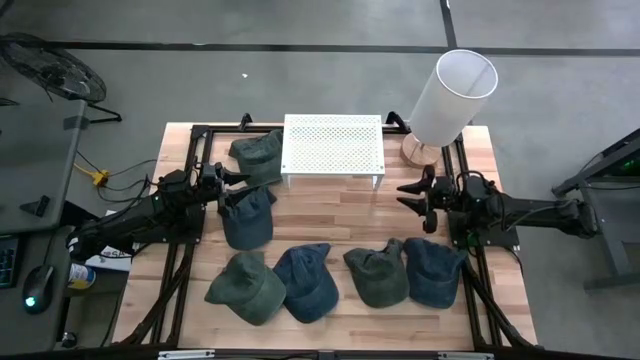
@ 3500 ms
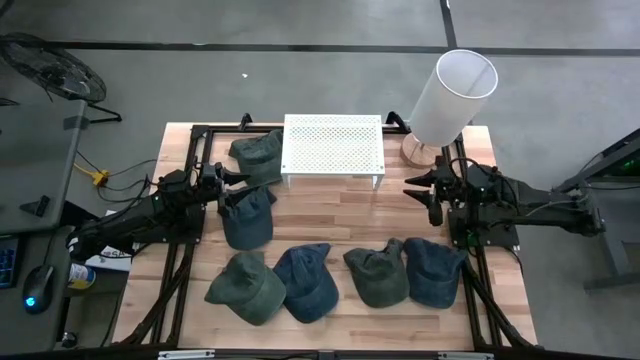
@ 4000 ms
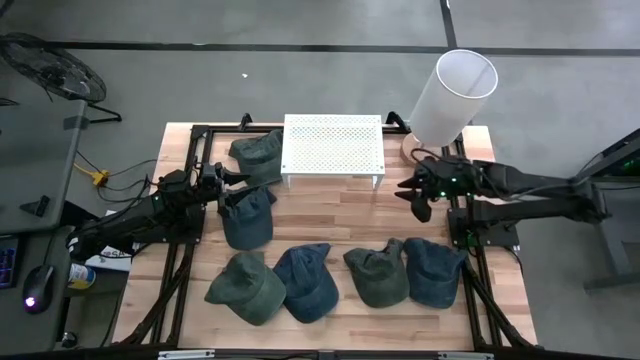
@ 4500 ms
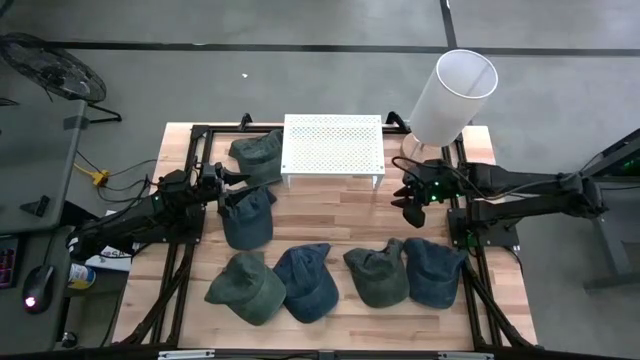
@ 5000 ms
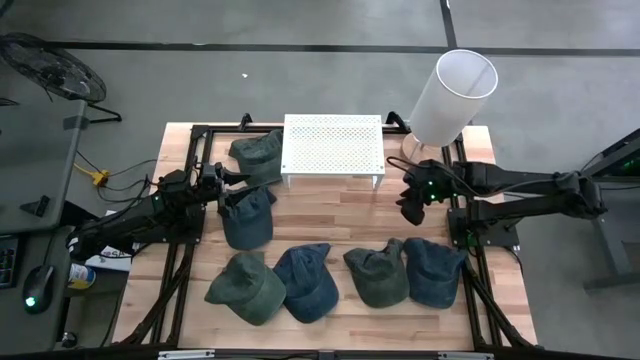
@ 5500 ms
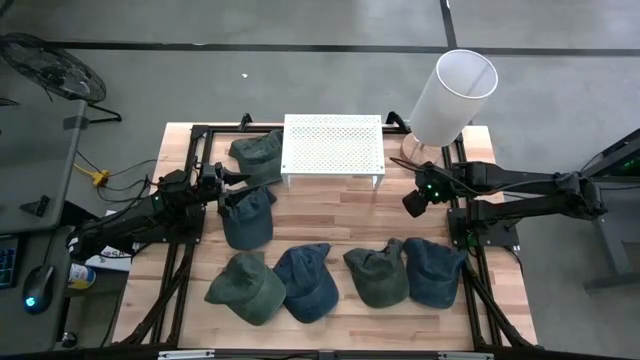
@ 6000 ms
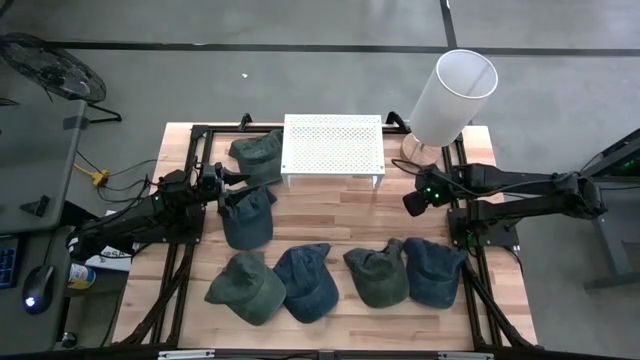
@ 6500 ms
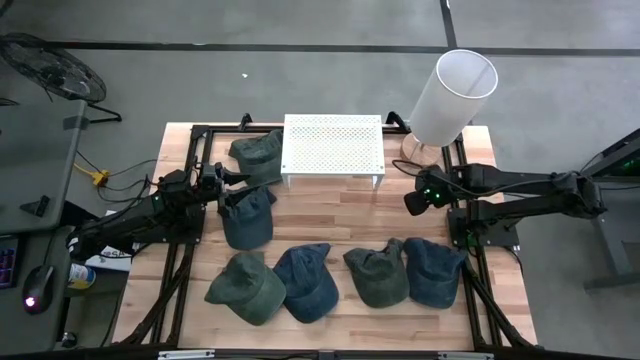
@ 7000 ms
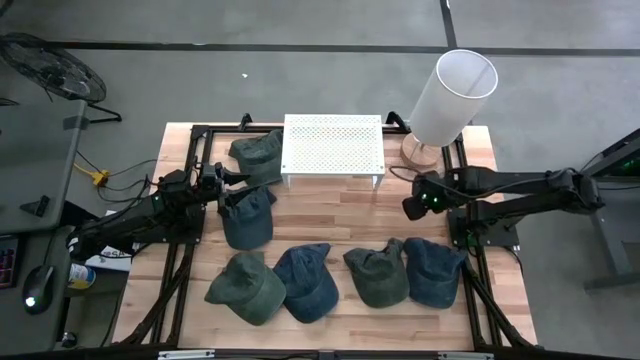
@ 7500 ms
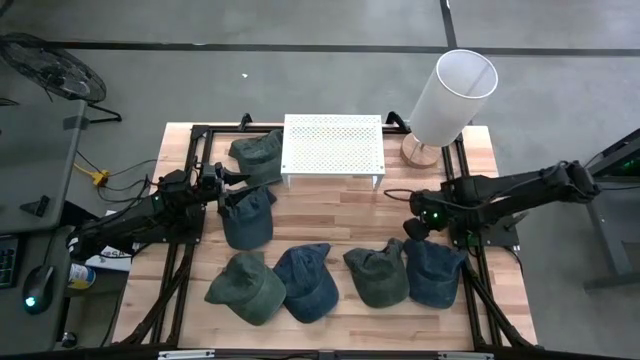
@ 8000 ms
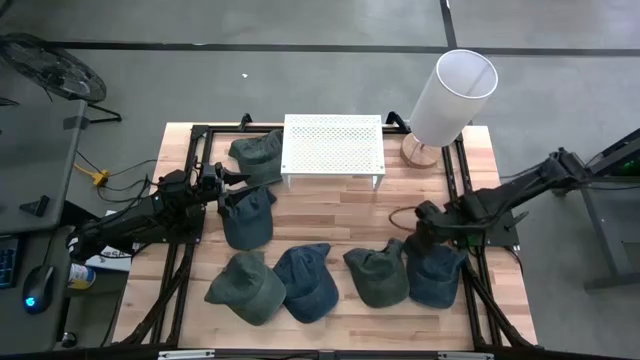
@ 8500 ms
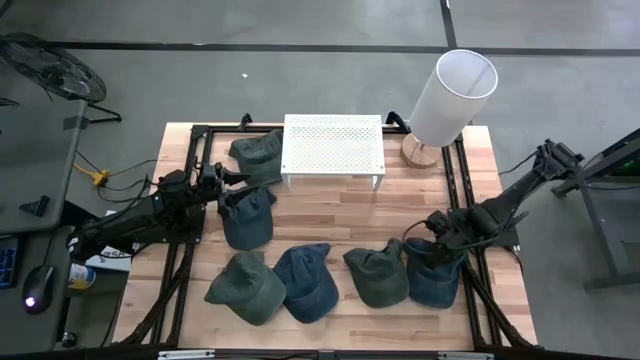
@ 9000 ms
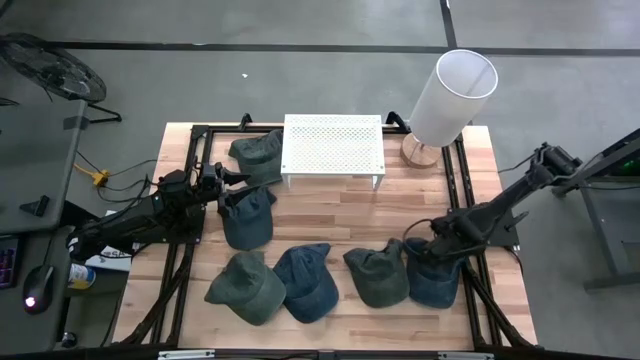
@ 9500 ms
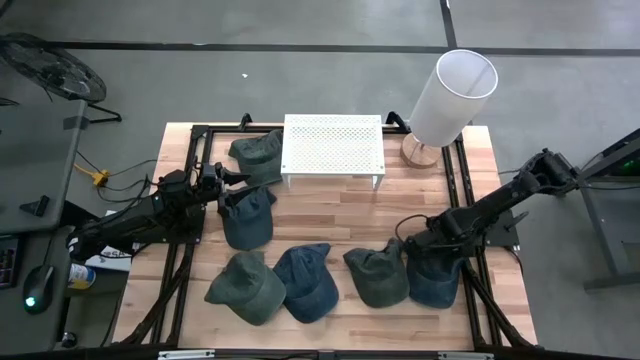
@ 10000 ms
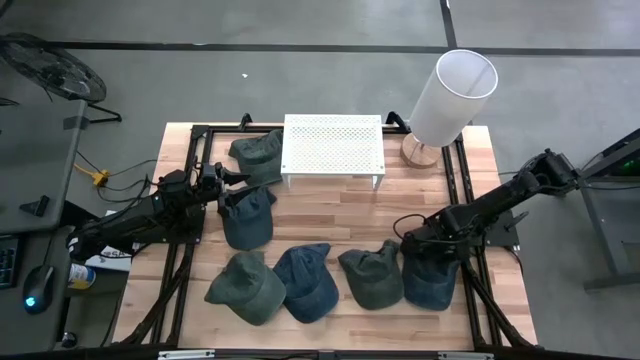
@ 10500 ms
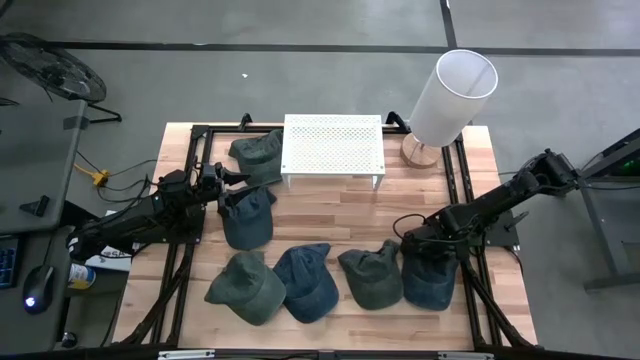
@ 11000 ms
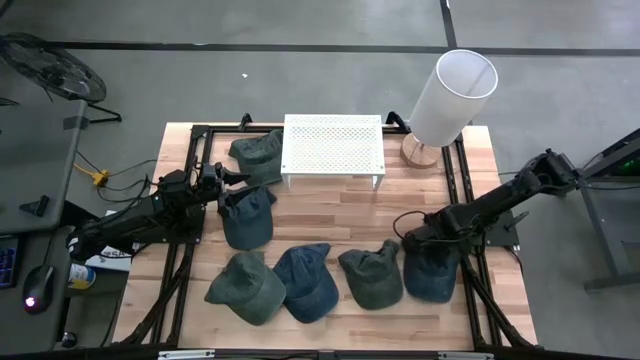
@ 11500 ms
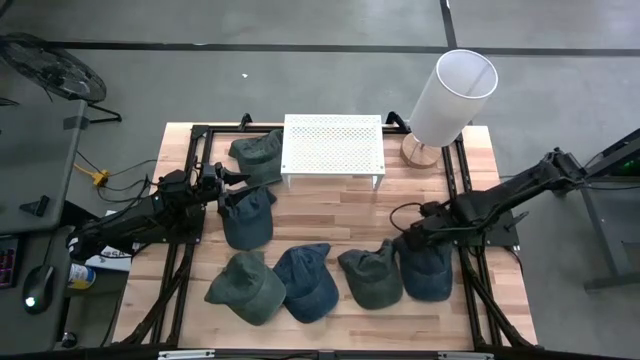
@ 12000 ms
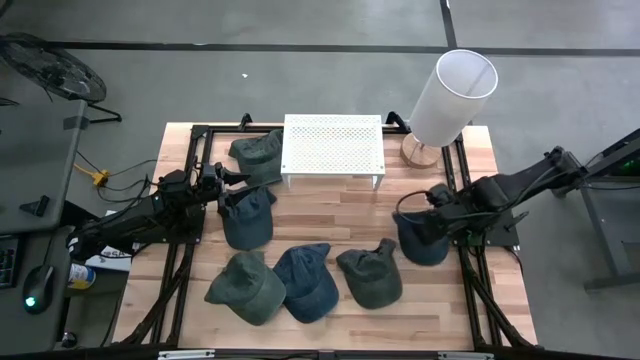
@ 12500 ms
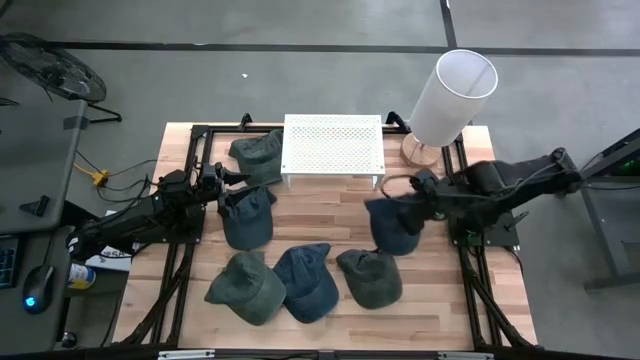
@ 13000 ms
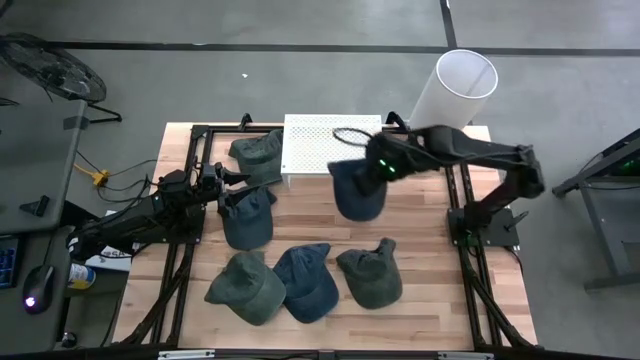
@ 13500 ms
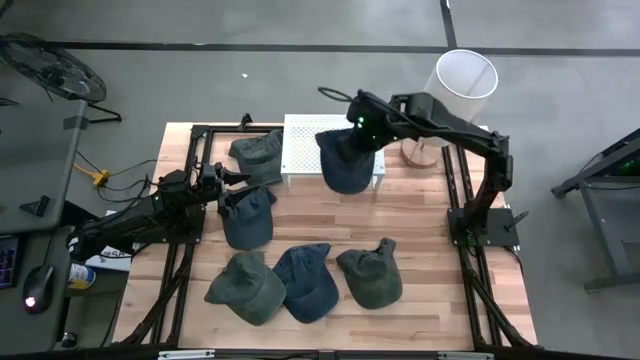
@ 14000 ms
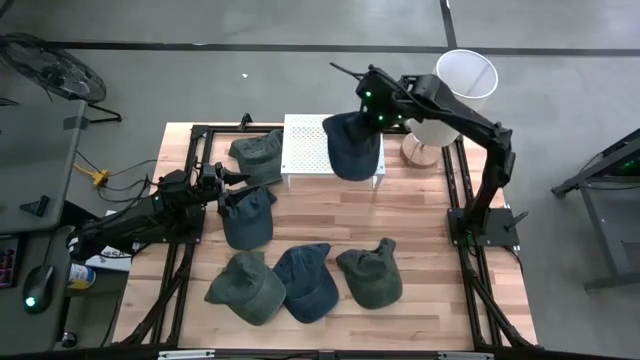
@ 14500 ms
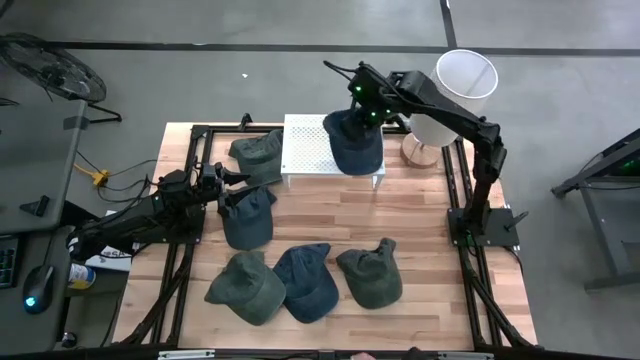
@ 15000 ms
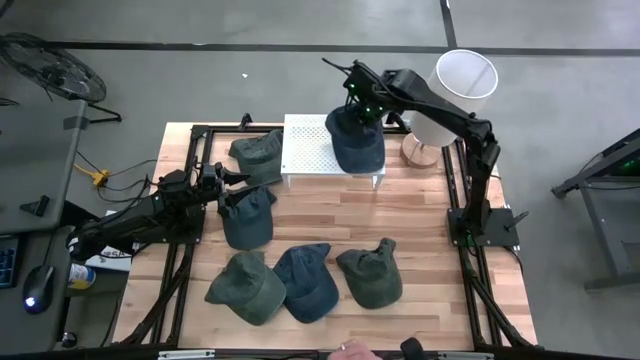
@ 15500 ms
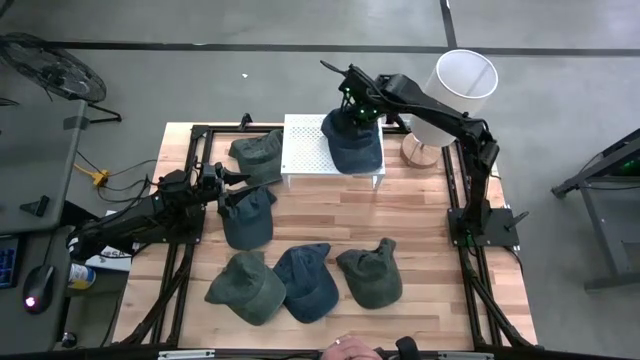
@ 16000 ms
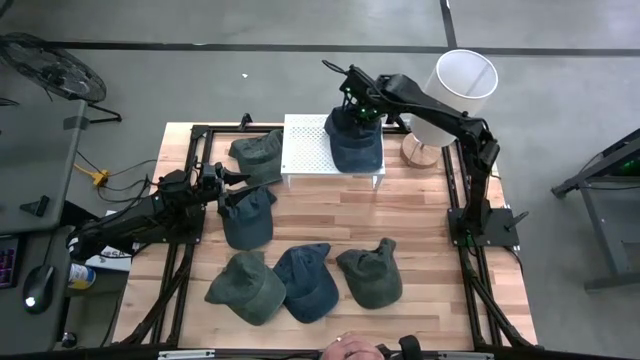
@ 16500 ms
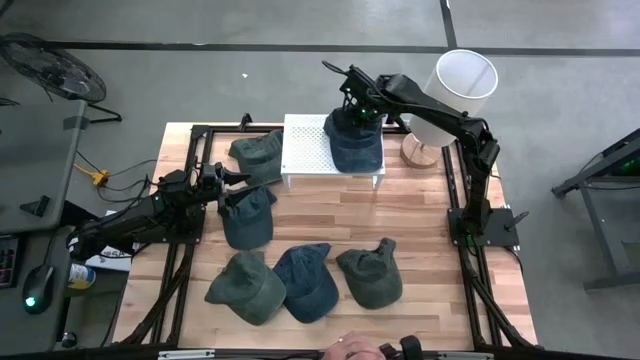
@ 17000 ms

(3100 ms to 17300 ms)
Task: Pick & Place hat
Put the dark blue cap on the shelf

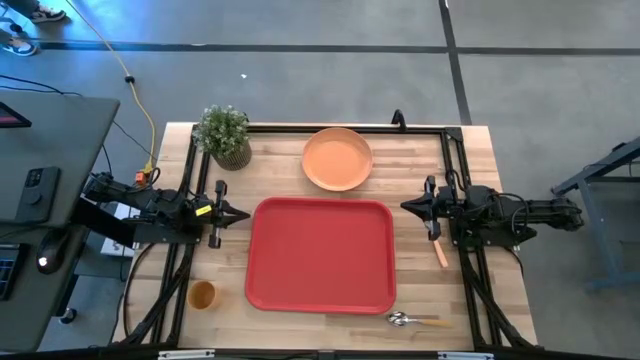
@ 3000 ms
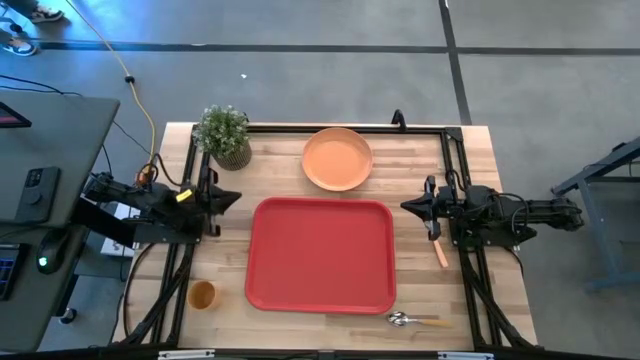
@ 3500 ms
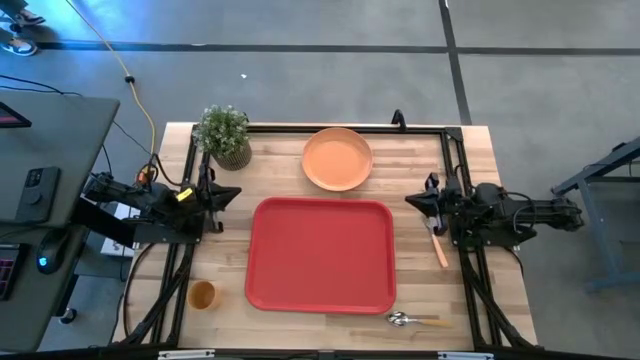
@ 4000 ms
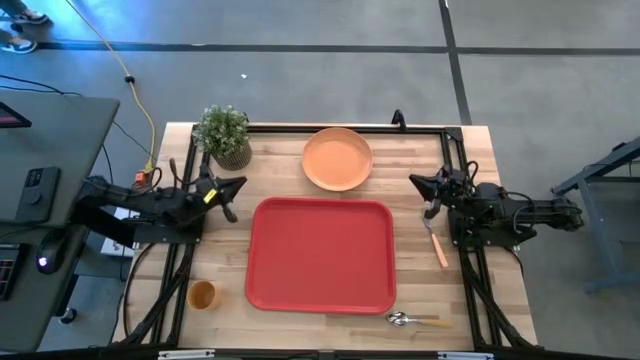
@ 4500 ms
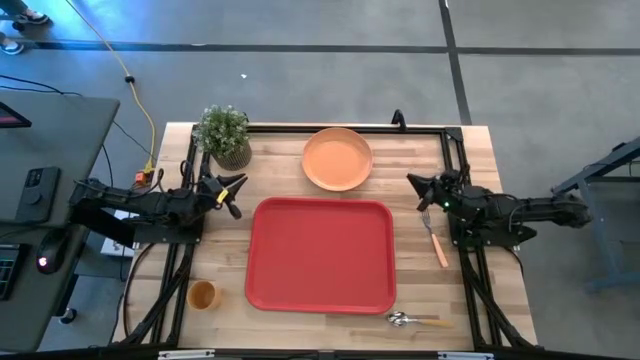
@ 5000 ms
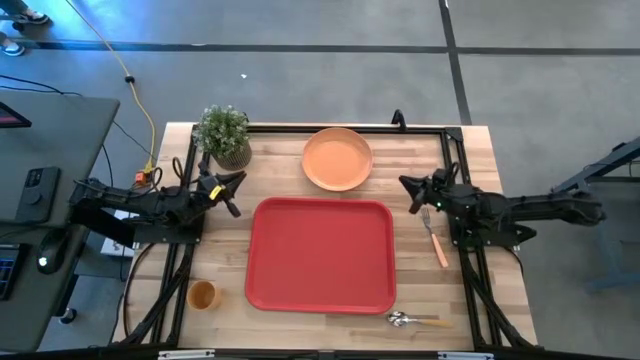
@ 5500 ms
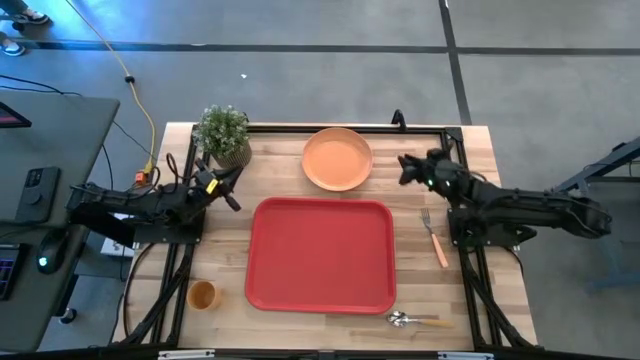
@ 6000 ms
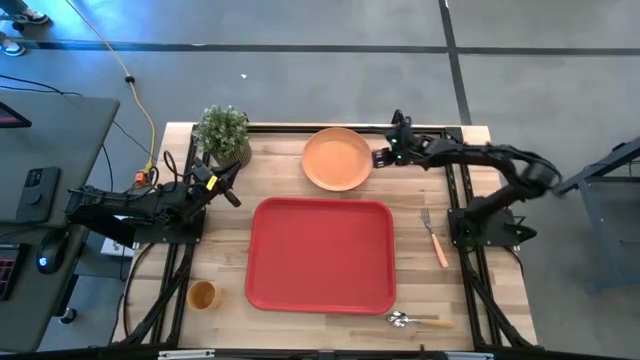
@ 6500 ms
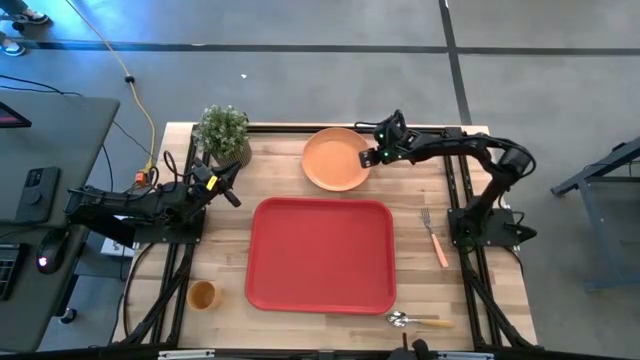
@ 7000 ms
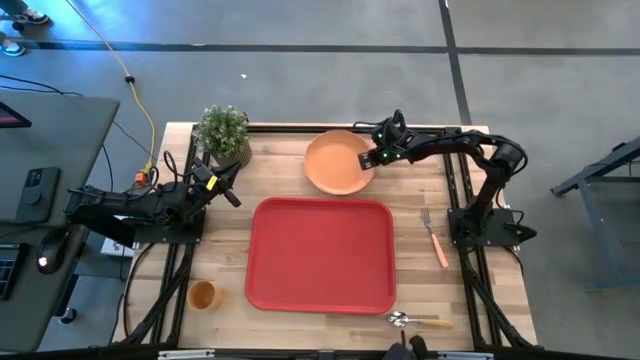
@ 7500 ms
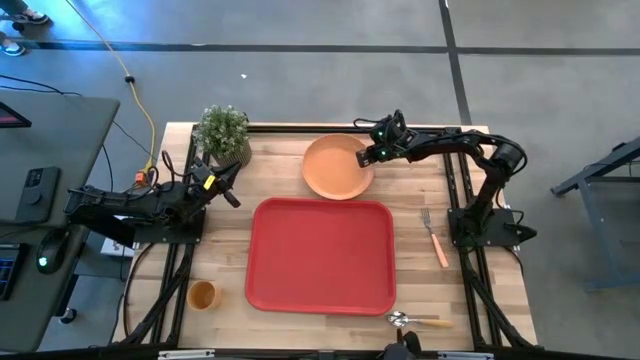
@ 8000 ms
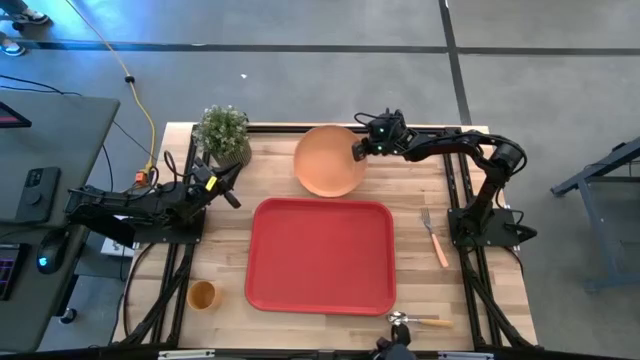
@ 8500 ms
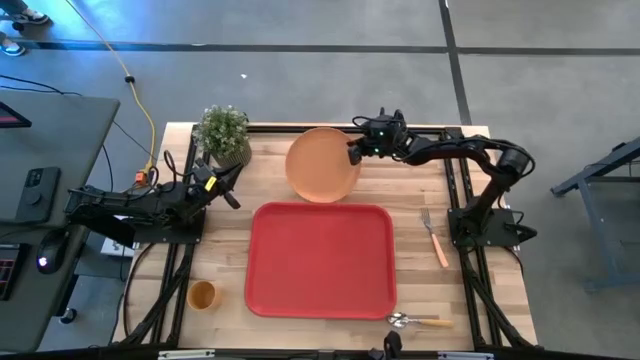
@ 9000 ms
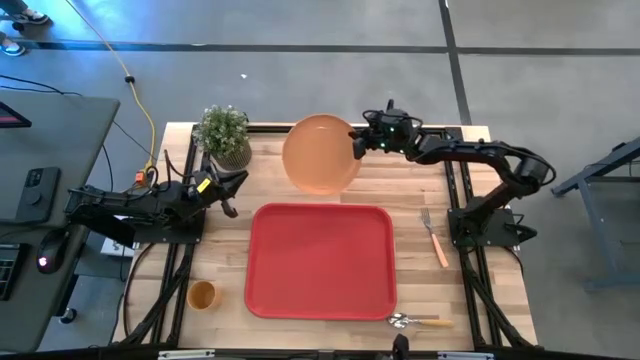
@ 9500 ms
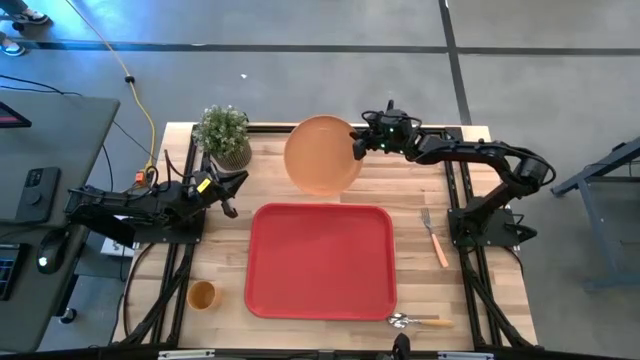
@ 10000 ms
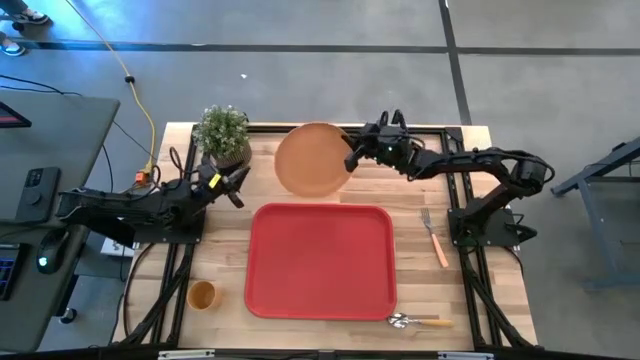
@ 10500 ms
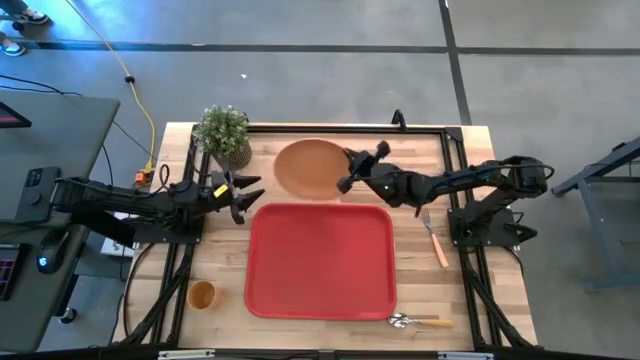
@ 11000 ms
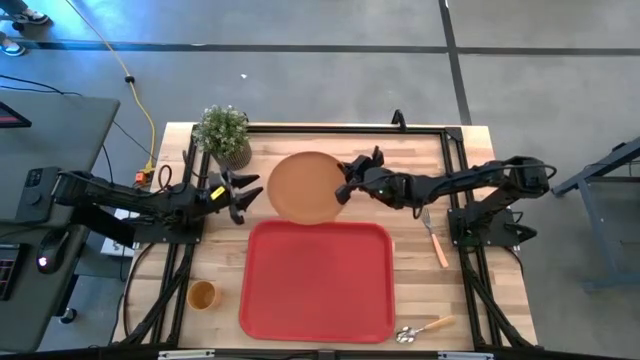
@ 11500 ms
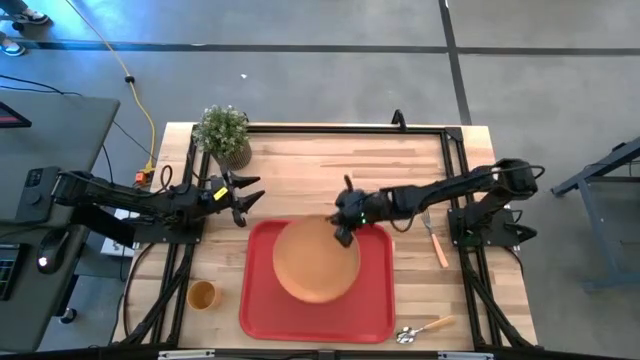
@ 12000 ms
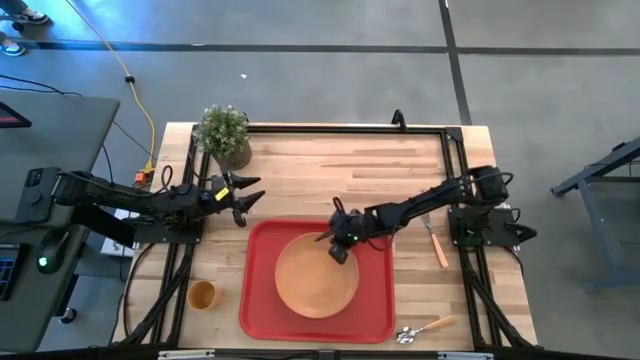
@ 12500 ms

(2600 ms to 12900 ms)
Task: Pick and place plate/cup/fork/spoon on tray
Put the orange plate on the red table tray
